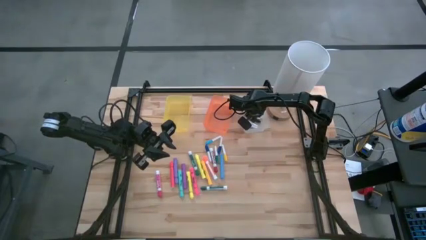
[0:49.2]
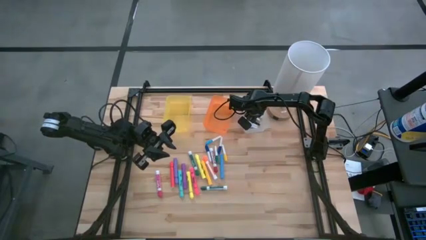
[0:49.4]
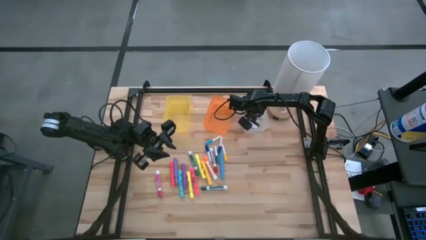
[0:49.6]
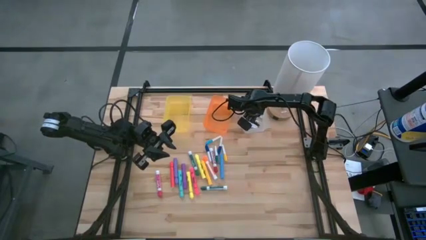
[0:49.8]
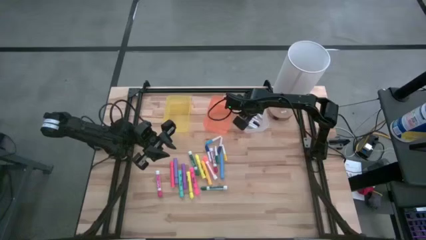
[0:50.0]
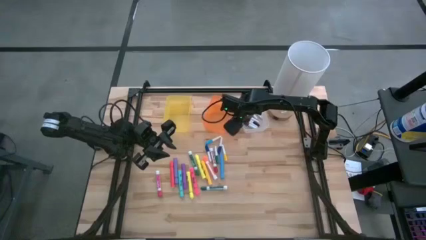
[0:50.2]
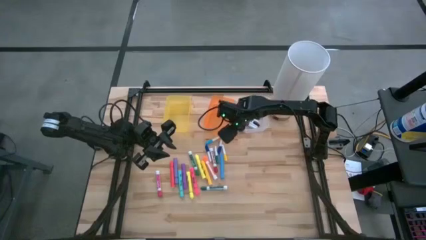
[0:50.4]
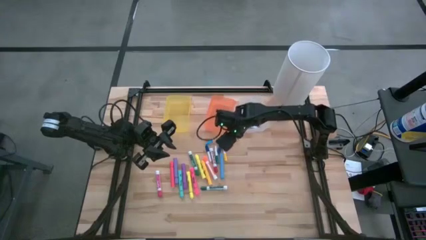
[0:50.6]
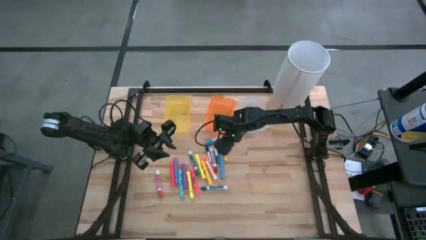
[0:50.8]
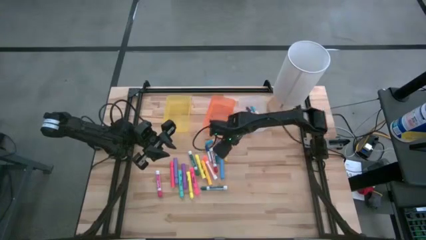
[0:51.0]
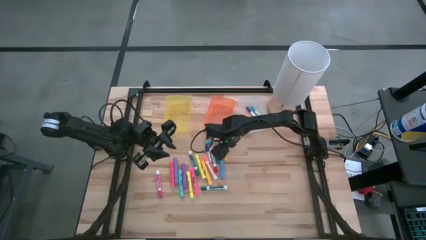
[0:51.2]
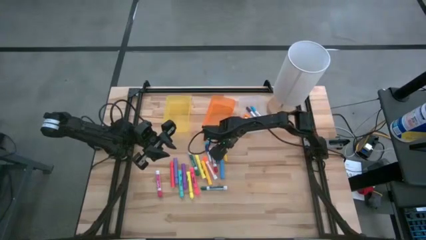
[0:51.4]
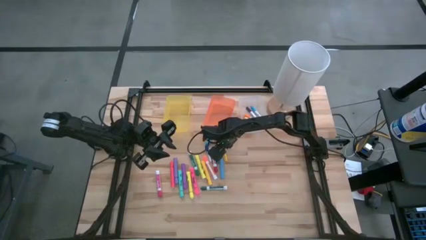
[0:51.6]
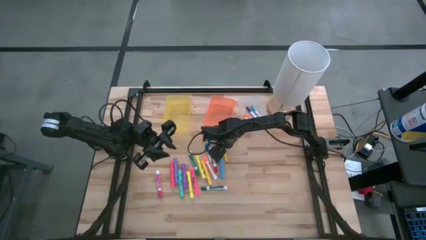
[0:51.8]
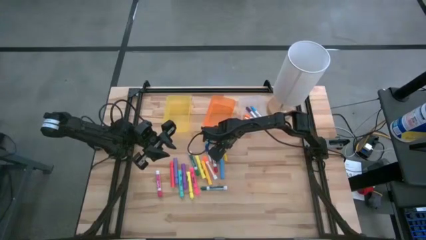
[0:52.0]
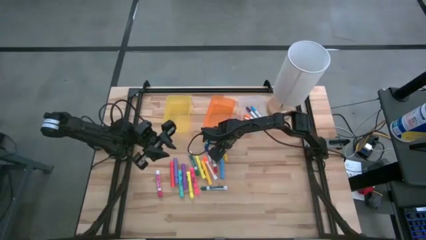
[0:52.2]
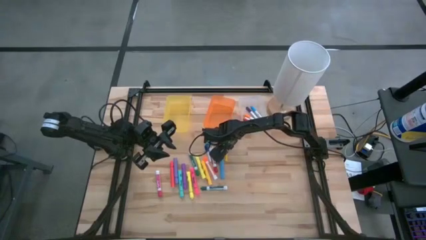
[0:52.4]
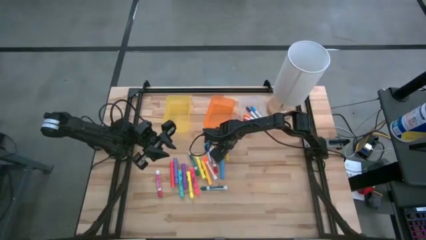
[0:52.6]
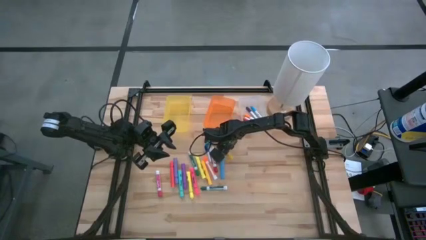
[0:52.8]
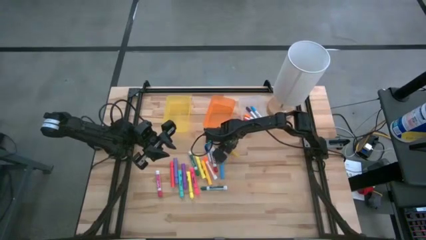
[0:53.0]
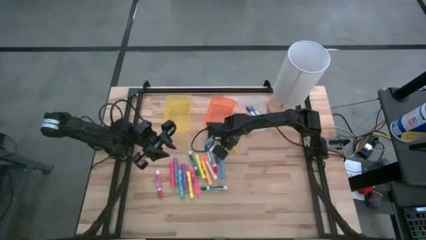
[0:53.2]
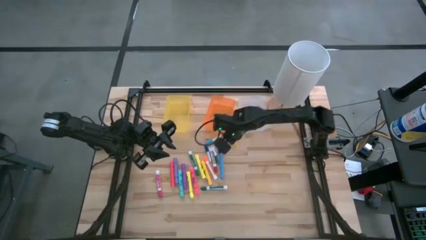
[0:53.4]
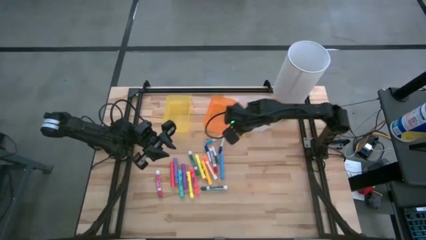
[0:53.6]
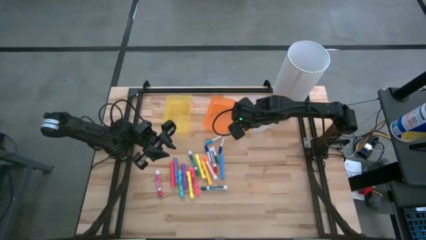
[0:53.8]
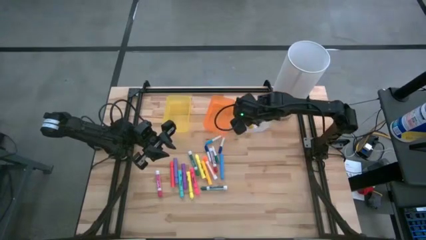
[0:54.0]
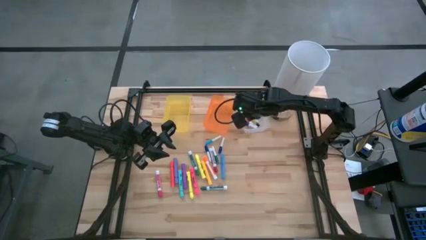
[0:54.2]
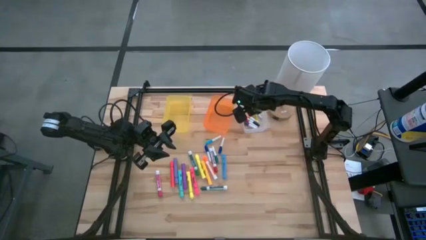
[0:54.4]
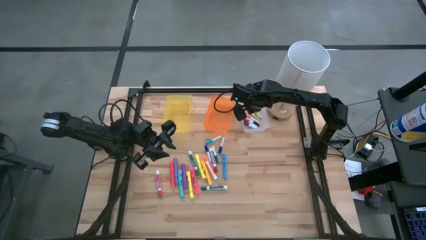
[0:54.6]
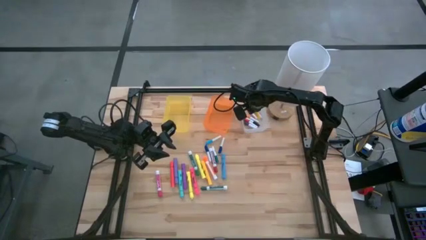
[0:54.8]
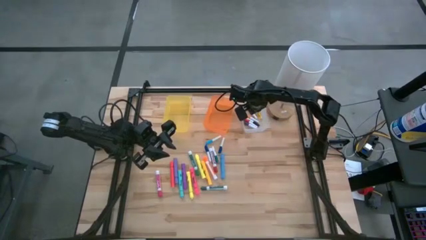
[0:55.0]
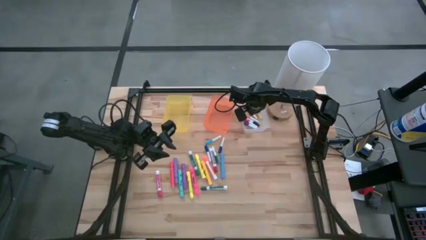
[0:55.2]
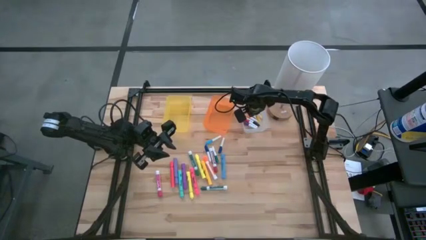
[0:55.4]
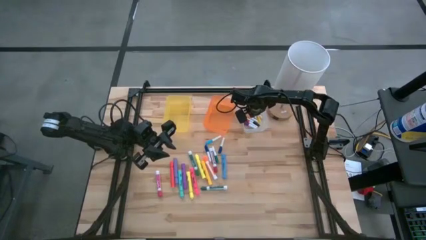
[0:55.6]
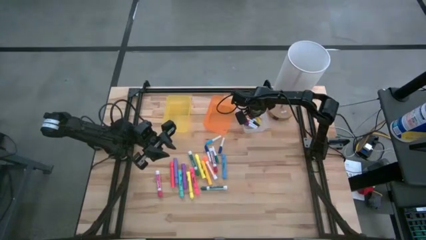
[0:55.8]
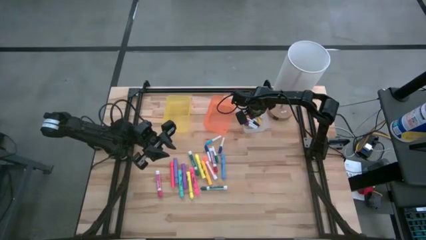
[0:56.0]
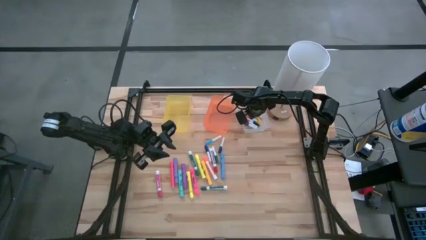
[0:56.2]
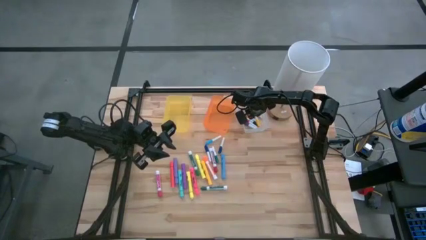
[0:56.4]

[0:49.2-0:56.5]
Task: Pick & Place Markers
Put the yellow mini marker into the white bin

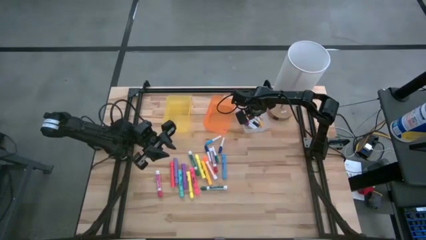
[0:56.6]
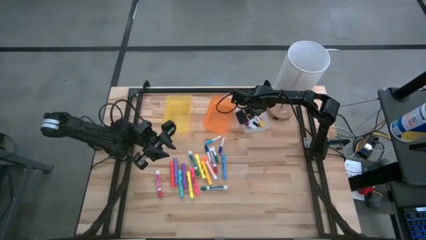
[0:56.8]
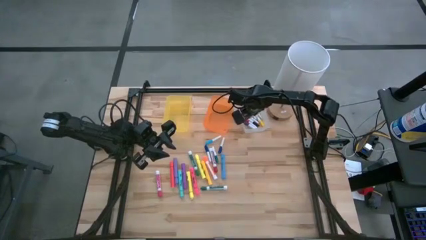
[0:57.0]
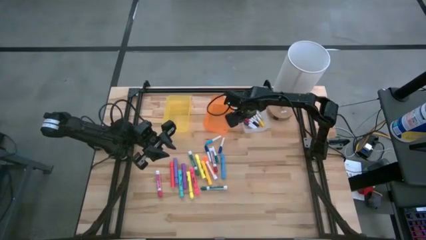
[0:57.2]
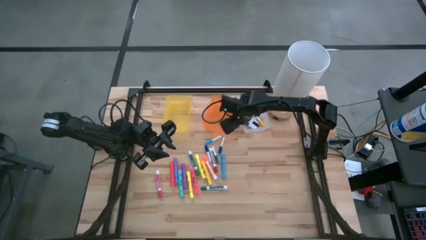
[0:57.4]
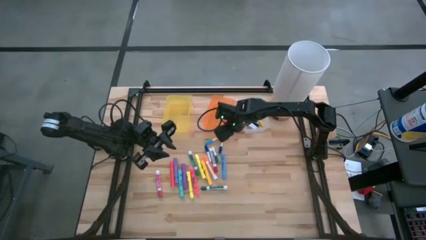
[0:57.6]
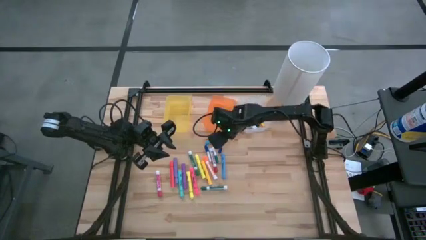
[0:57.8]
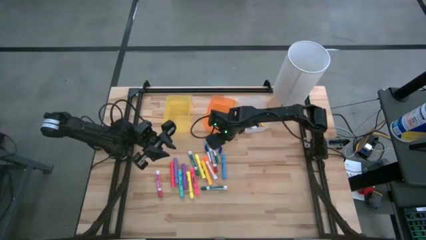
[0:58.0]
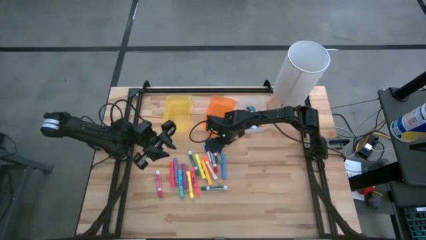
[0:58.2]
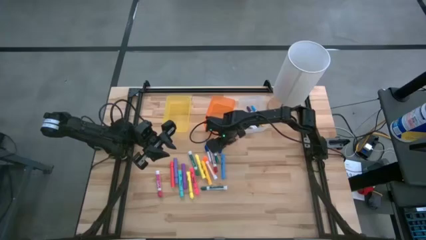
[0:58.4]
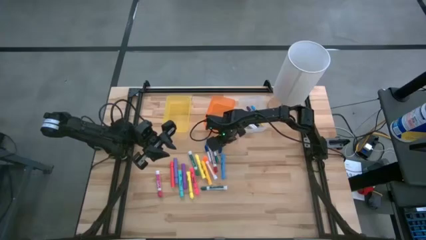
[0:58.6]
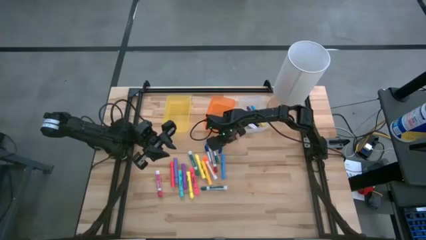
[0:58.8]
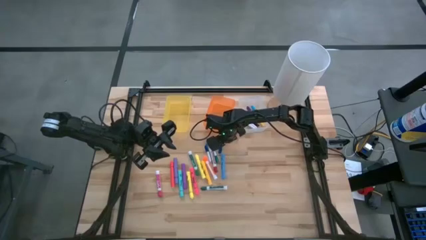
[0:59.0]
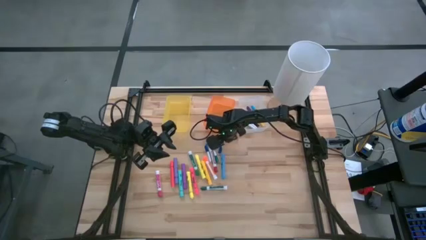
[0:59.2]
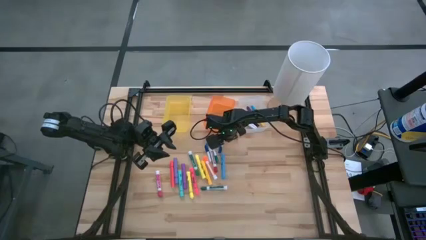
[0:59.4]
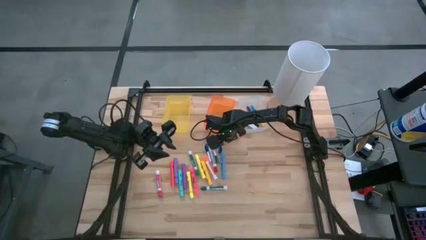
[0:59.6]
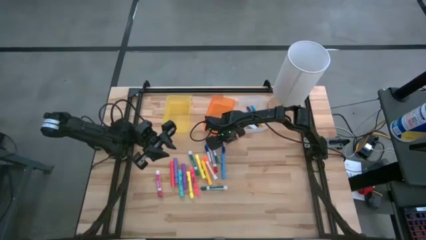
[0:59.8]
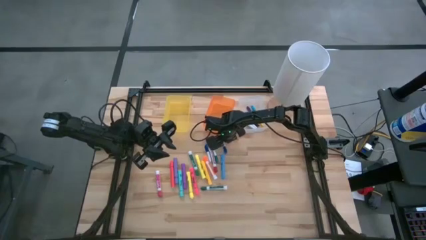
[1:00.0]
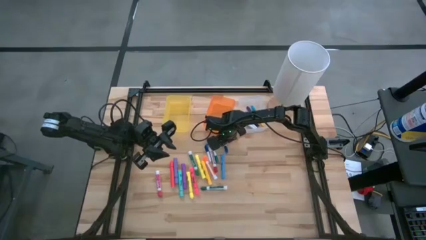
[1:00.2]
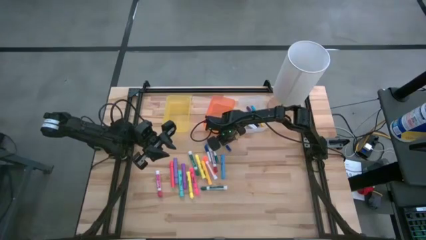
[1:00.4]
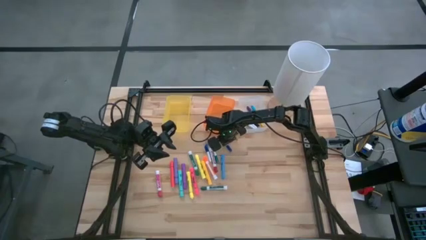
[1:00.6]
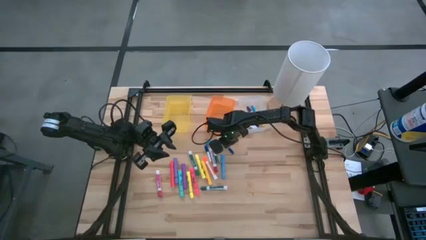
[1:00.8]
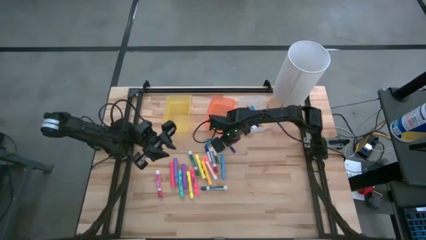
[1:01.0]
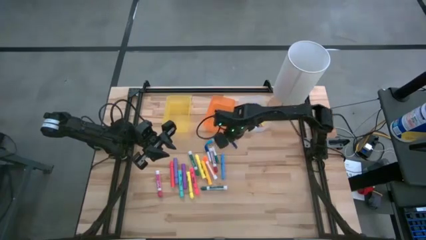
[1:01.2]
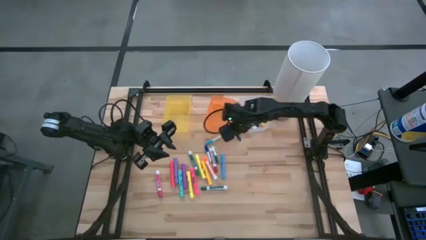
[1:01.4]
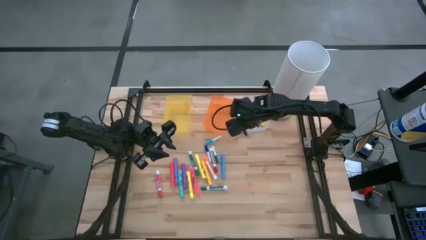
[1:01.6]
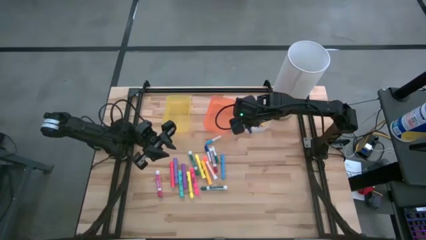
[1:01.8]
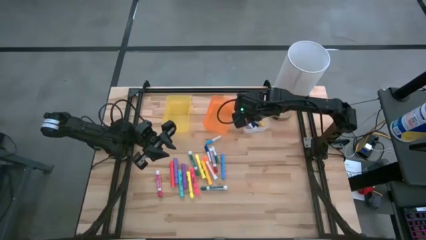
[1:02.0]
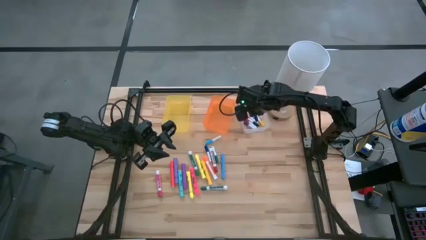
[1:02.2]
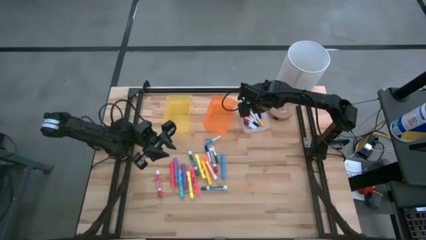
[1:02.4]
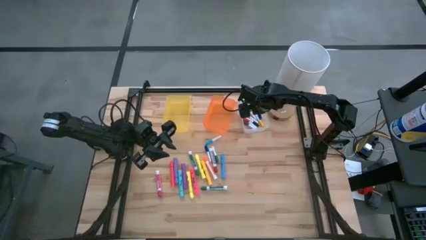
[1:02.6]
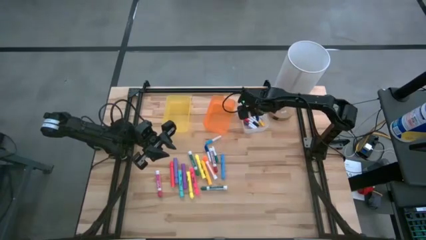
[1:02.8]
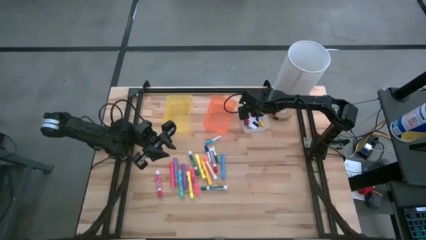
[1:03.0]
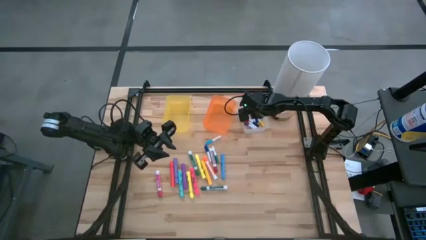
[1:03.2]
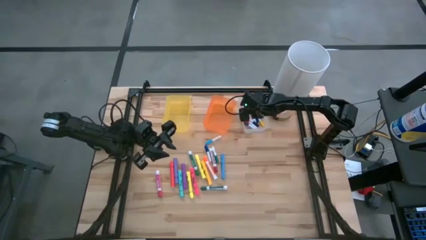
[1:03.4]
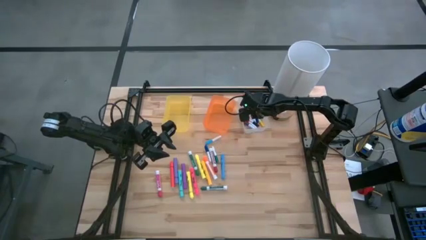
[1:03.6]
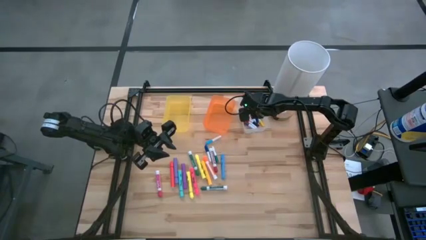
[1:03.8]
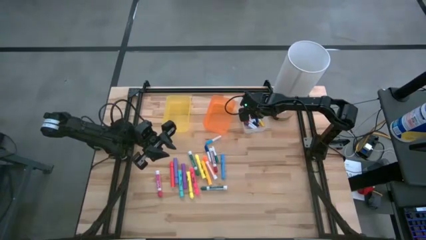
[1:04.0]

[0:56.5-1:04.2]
Put the right dark blue mini marker into the white bin

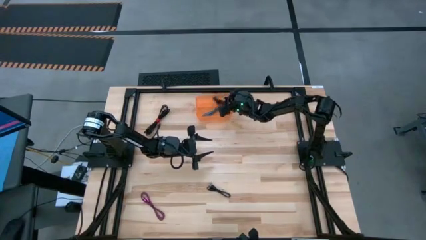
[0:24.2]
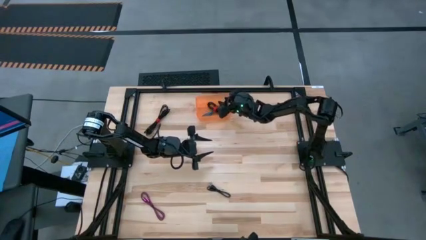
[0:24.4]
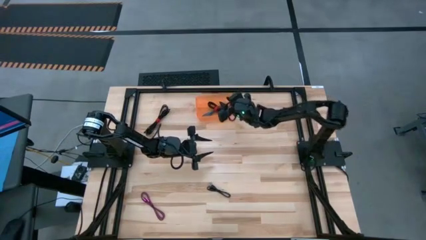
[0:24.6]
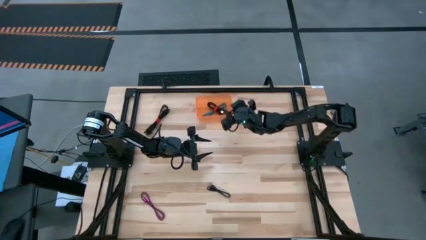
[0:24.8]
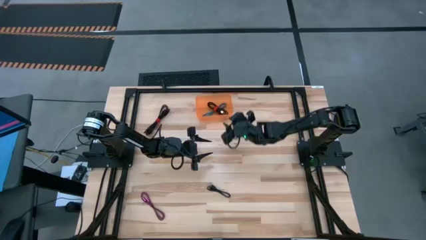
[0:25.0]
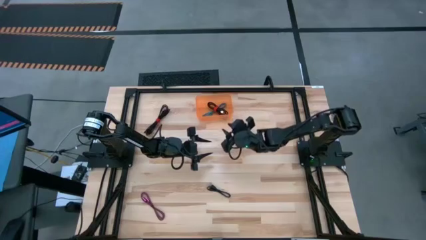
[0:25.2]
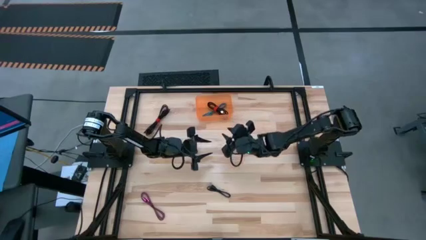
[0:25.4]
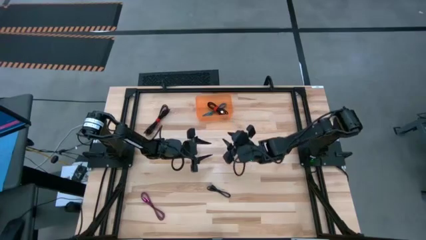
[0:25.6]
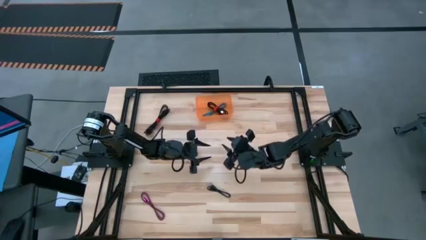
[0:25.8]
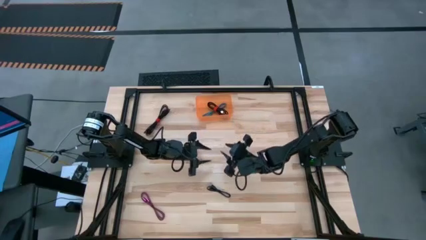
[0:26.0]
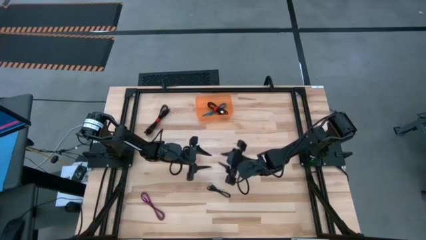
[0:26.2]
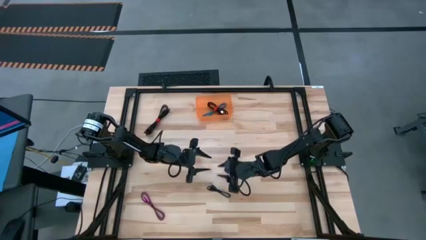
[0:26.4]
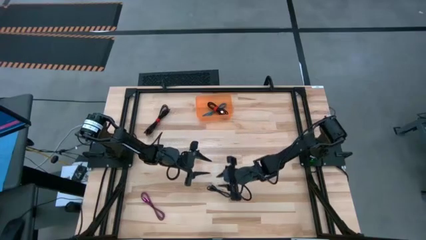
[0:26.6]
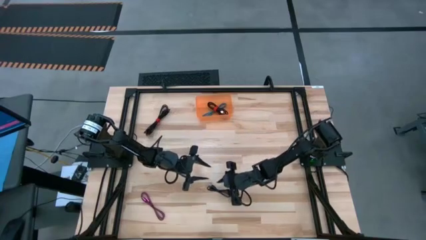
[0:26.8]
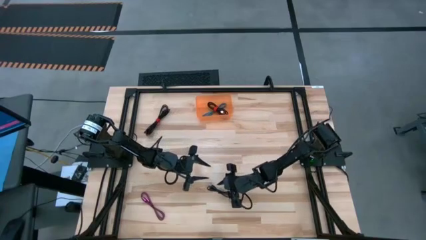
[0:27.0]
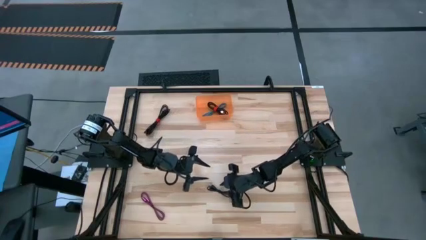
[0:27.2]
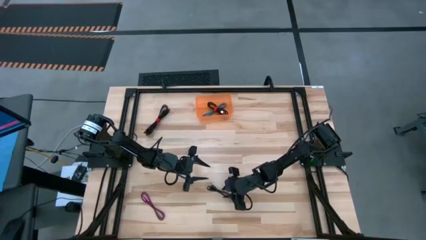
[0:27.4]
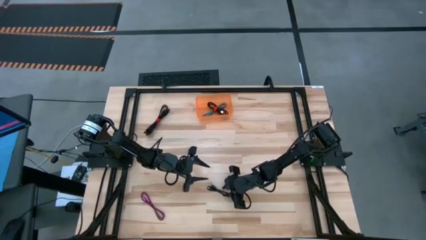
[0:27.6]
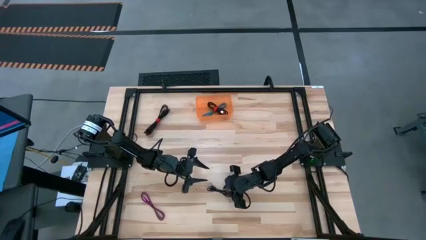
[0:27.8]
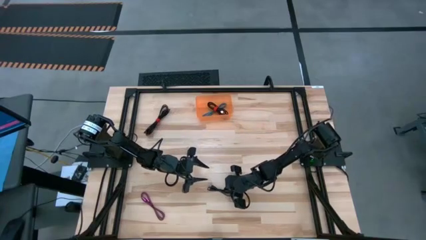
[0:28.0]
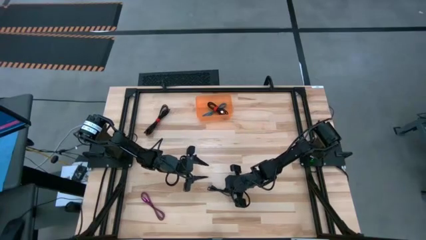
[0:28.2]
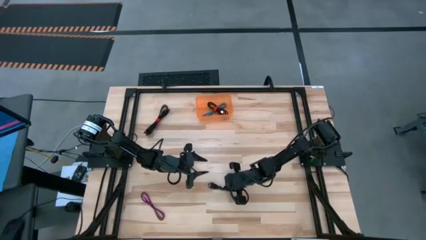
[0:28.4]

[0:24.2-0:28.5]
Task: Pick and place USB-C Cables
Put the bottom black charger cable into the orange bin
